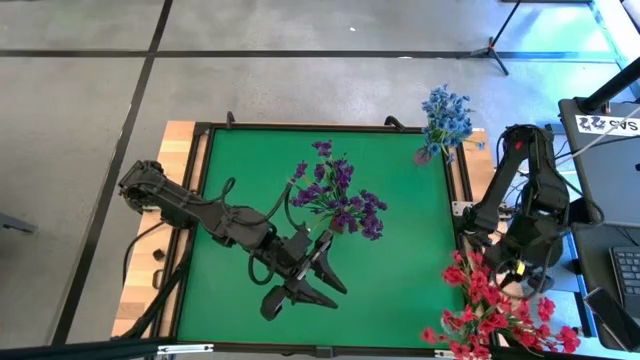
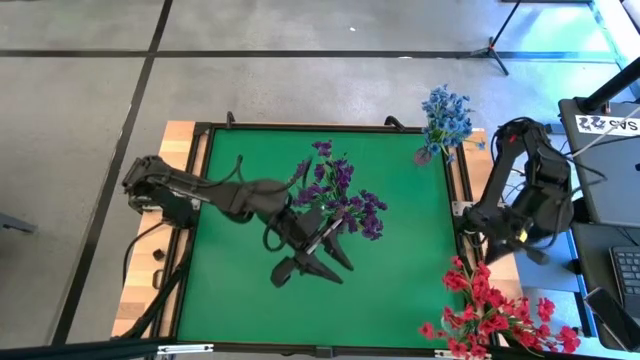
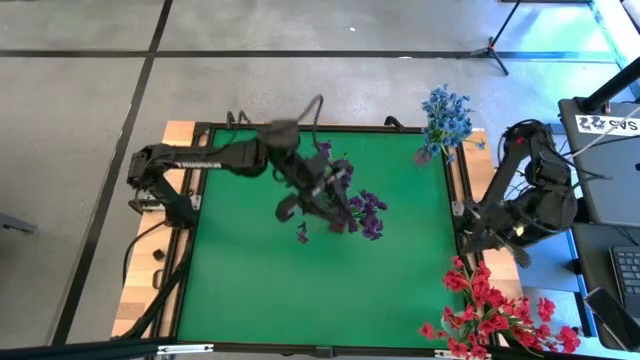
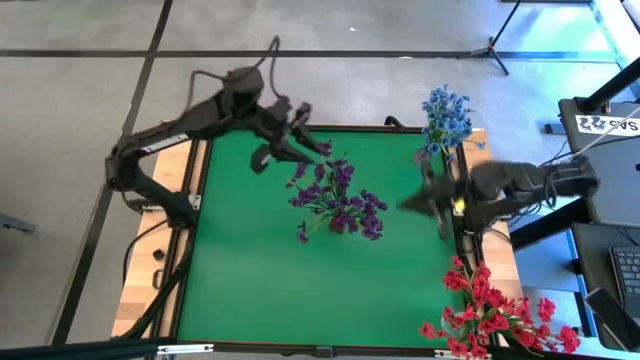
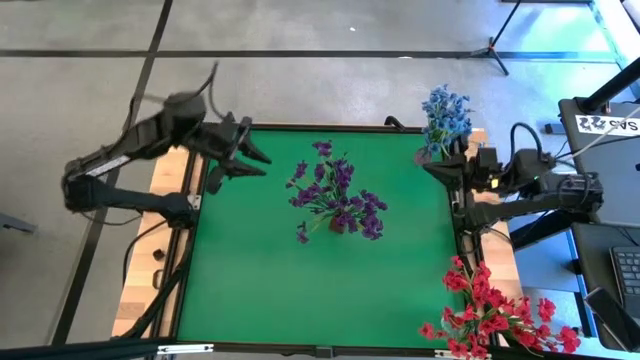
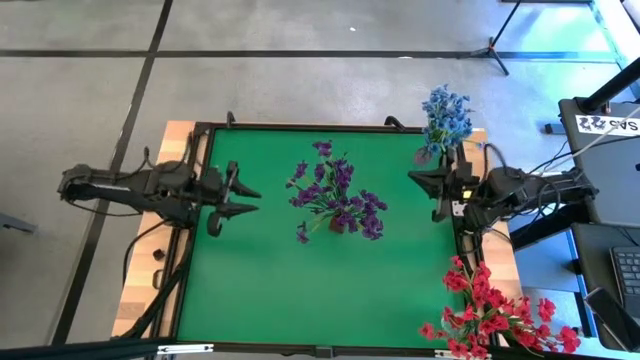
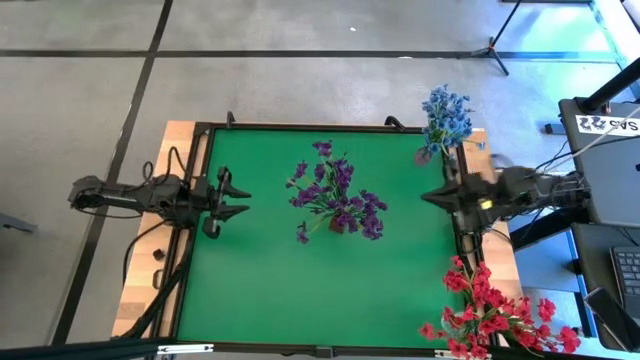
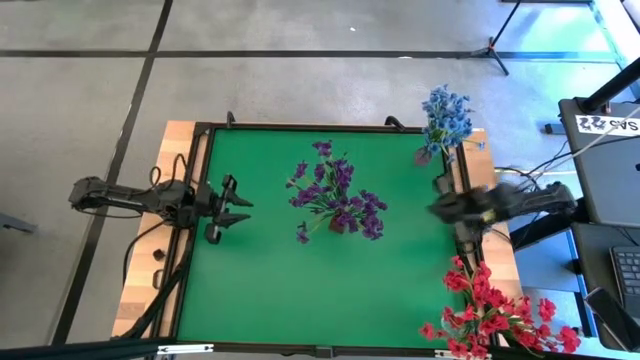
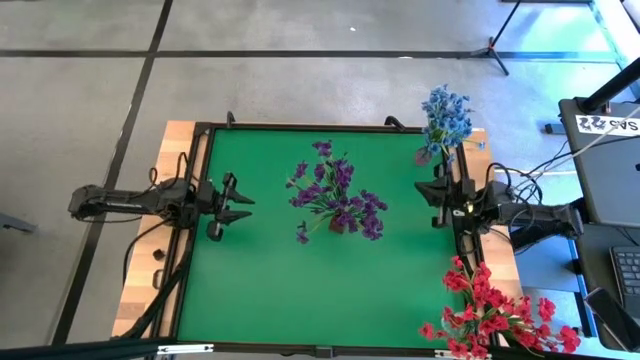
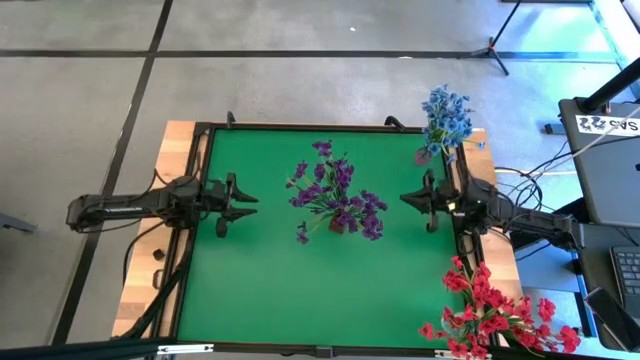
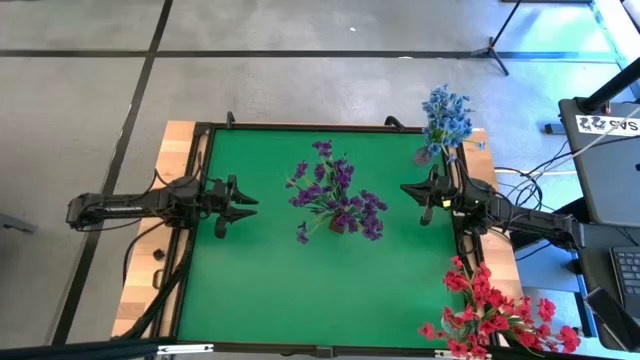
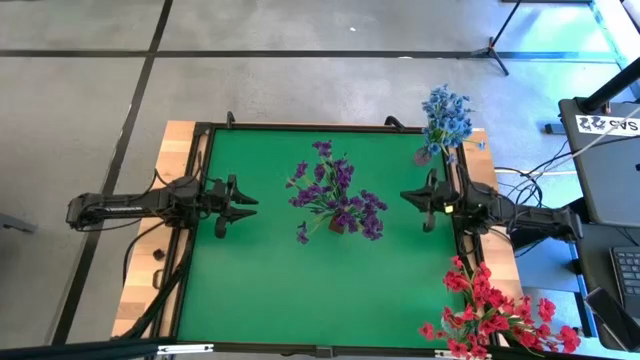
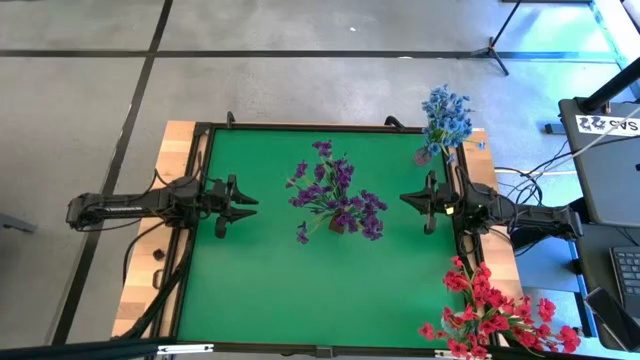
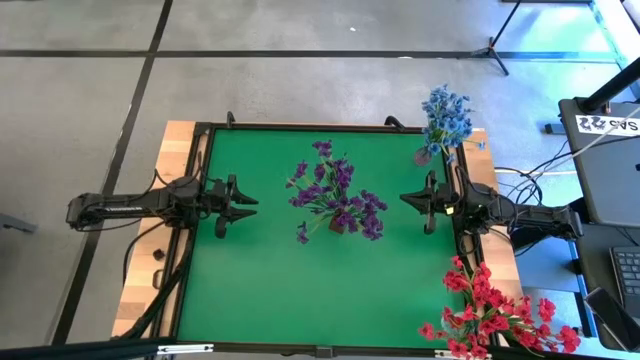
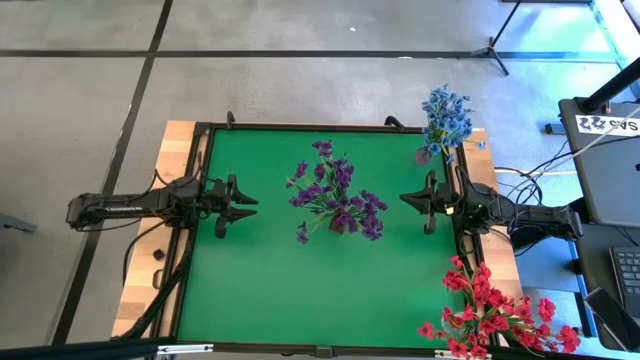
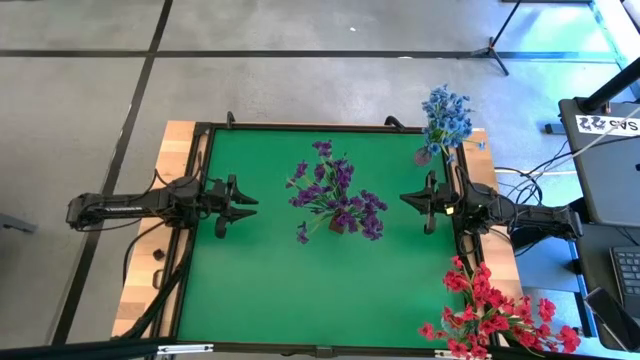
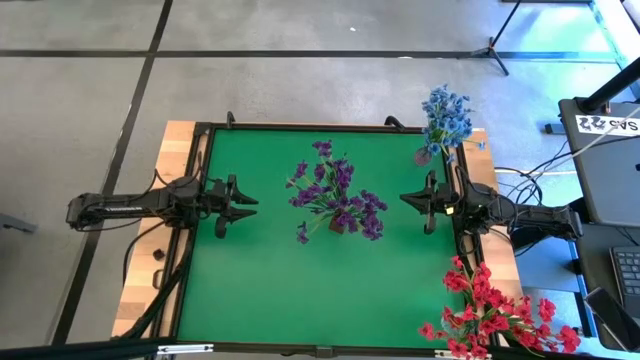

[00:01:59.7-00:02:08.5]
Task: Sort flowers into vase by color
Return to Home Position

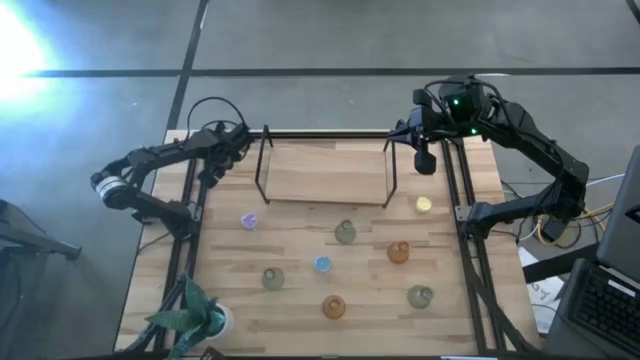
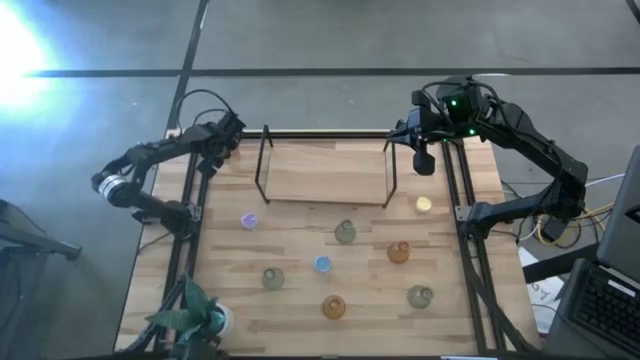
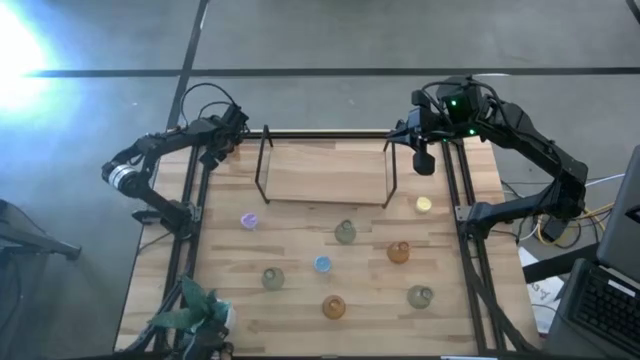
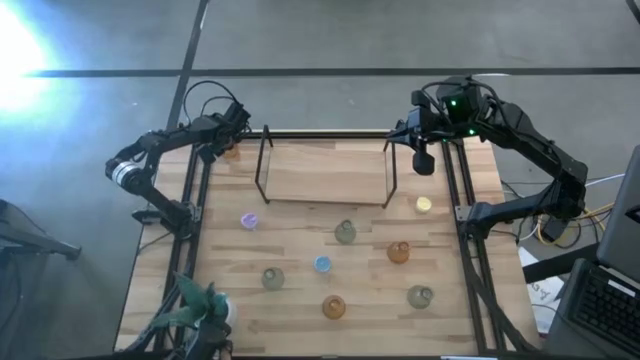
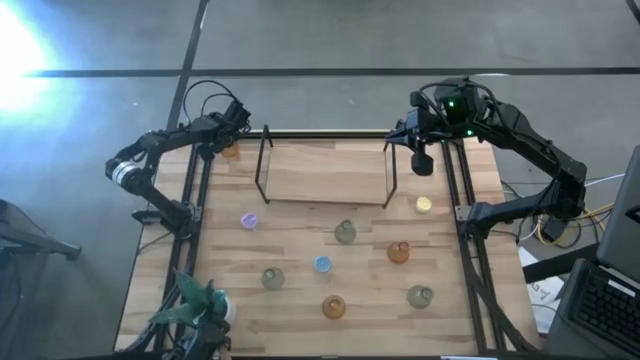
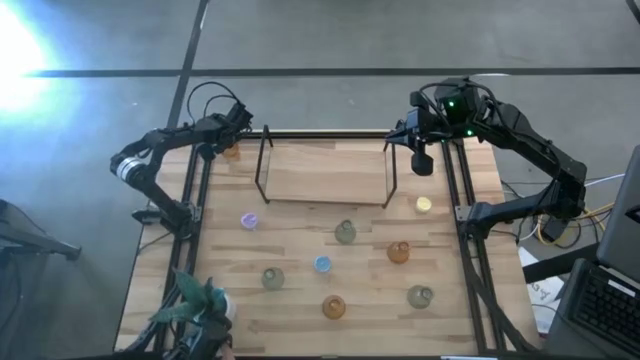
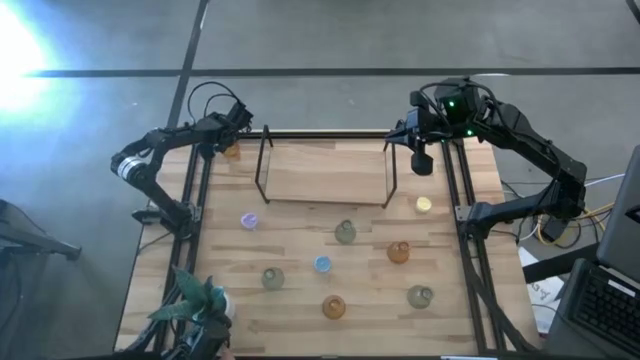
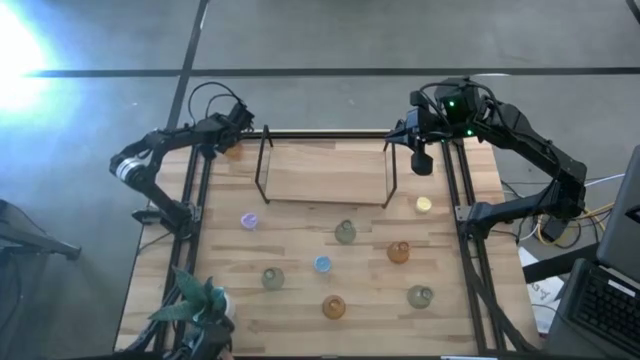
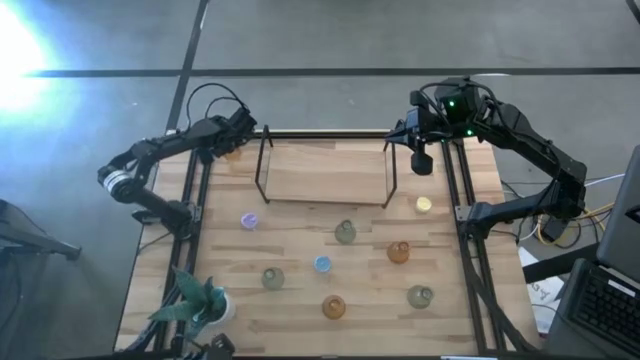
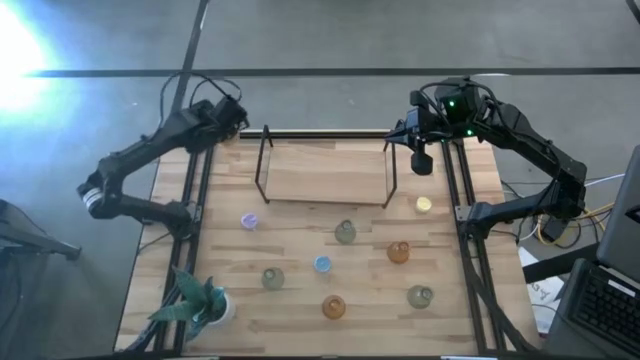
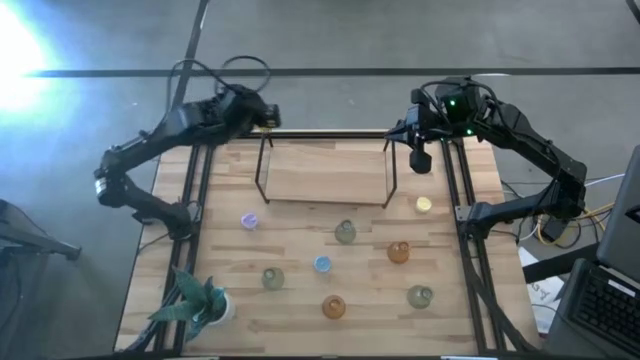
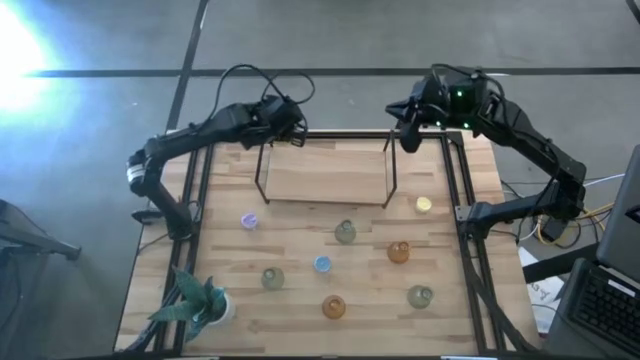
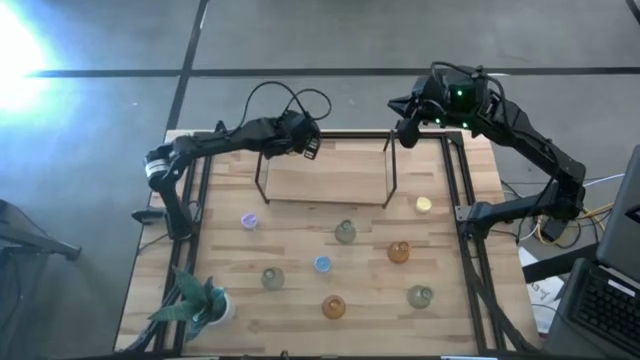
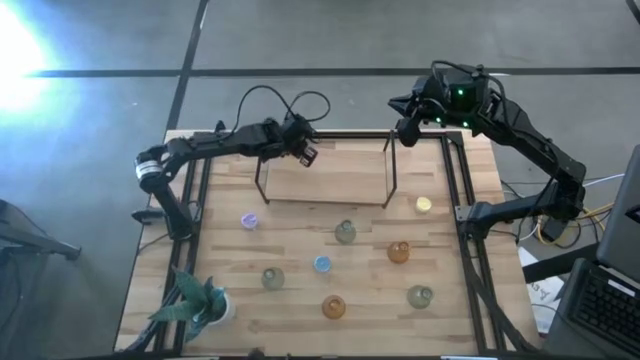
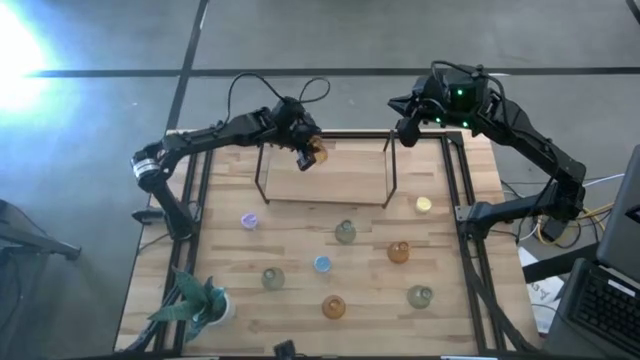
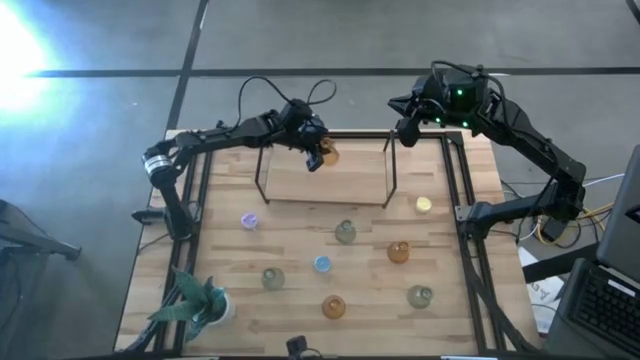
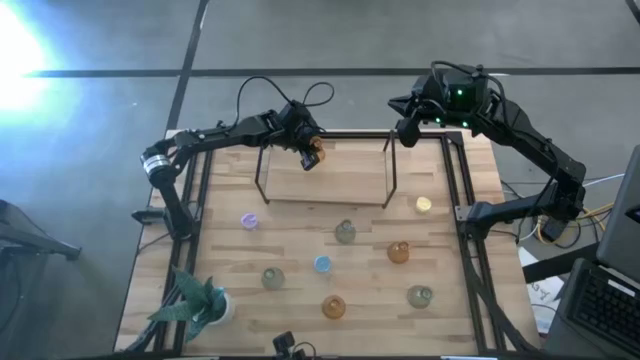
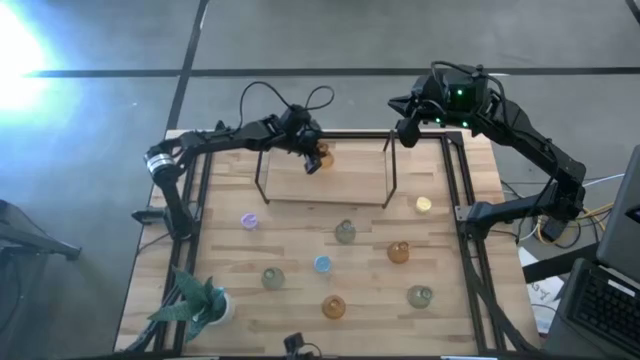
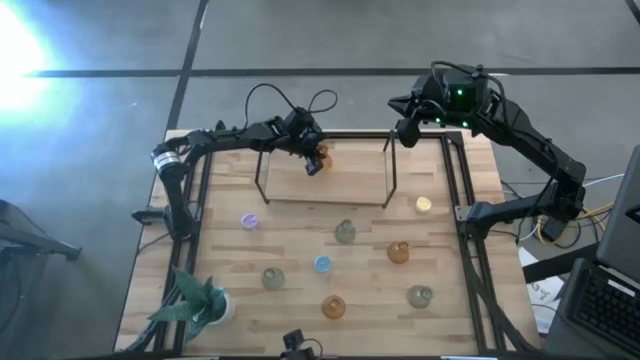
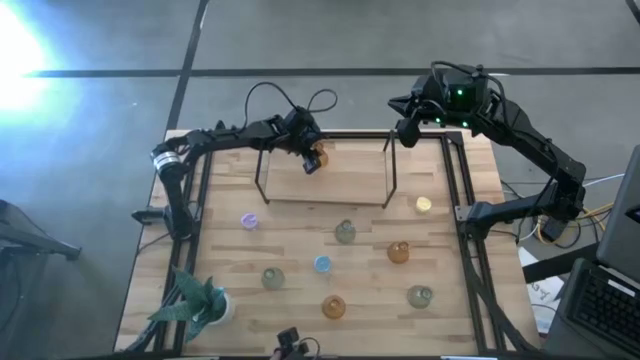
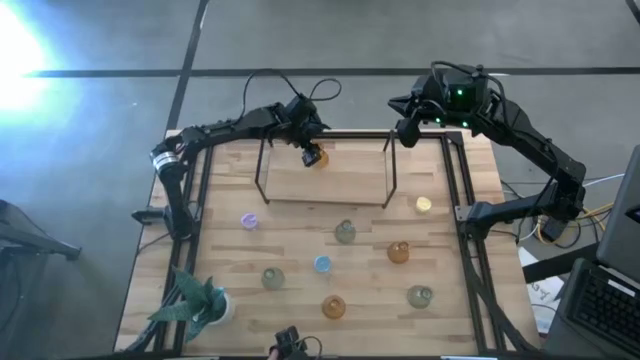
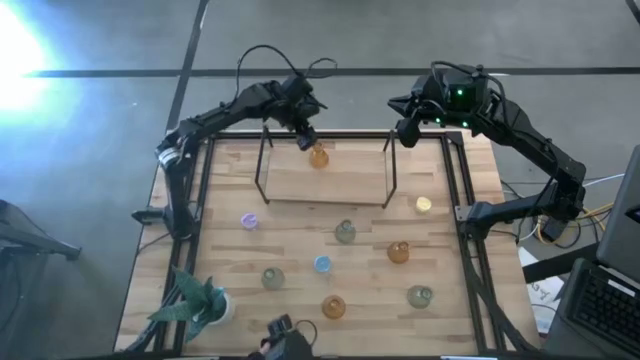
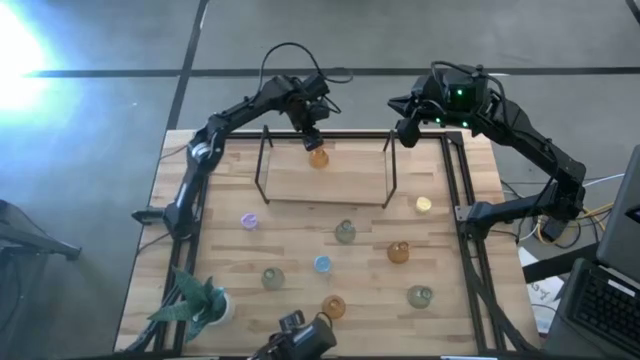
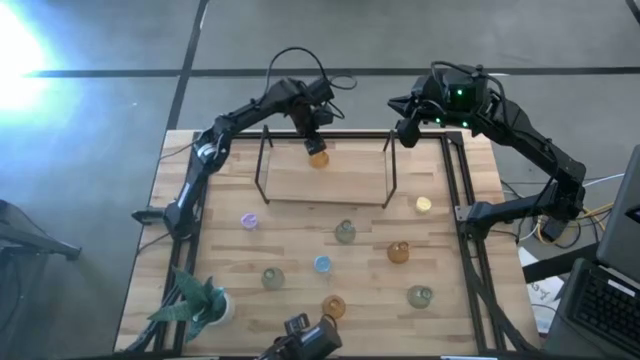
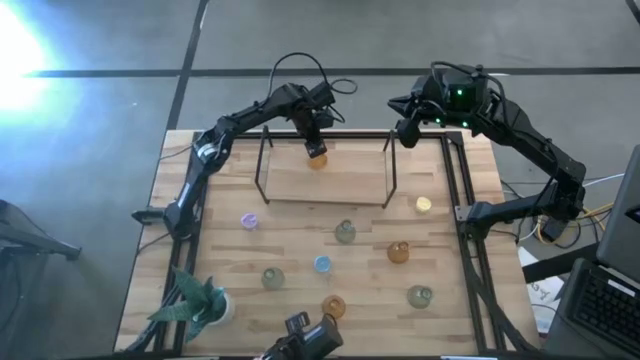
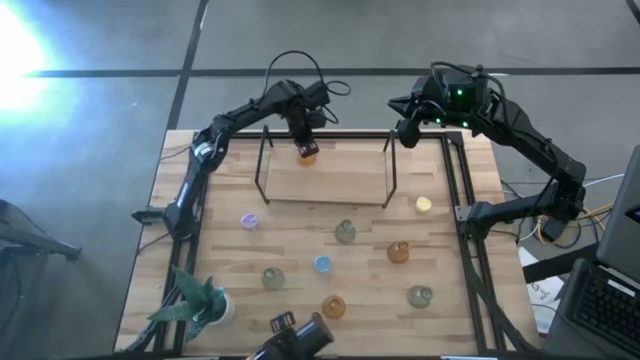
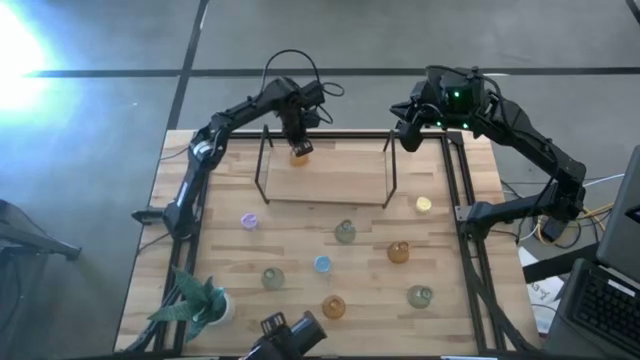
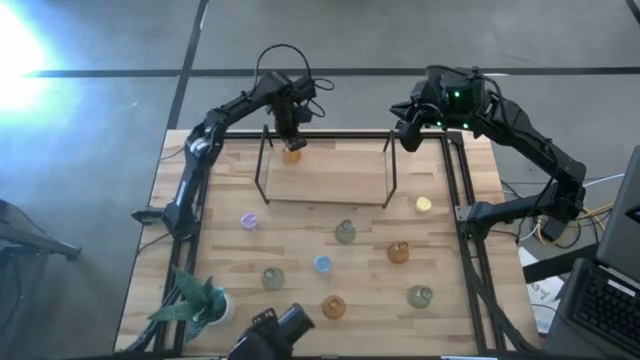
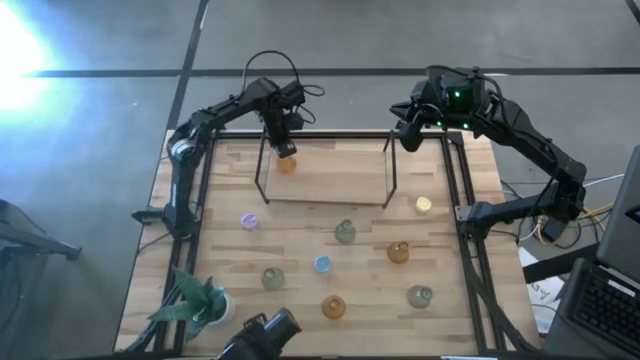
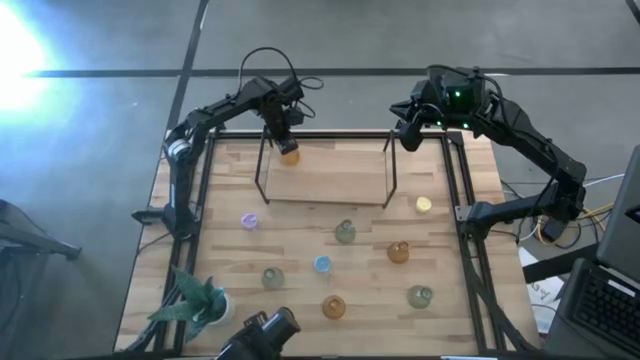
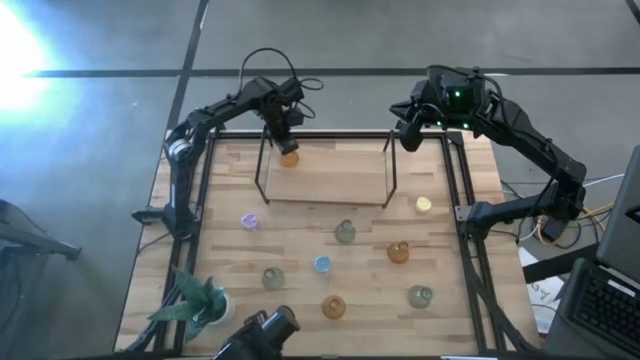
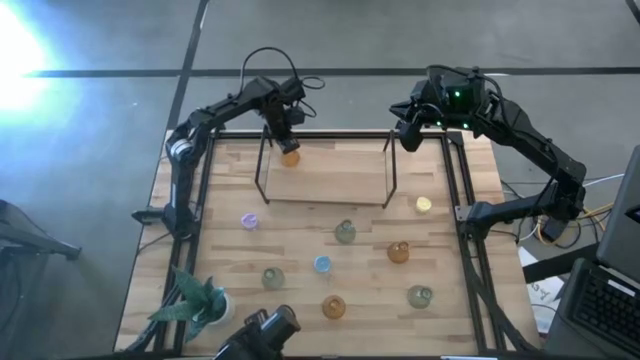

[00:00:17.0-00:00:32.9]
Task: Pick & Place candle stick holders
Put the top left yellow glass candle holder on the shelf
